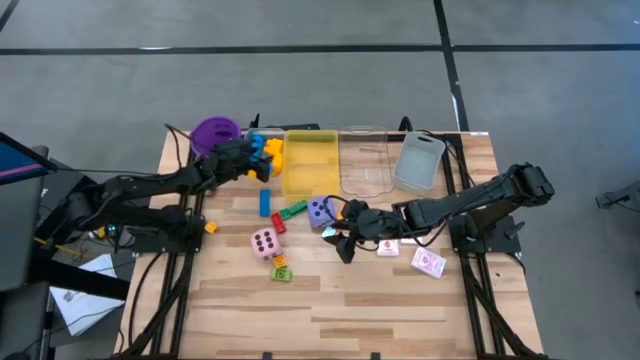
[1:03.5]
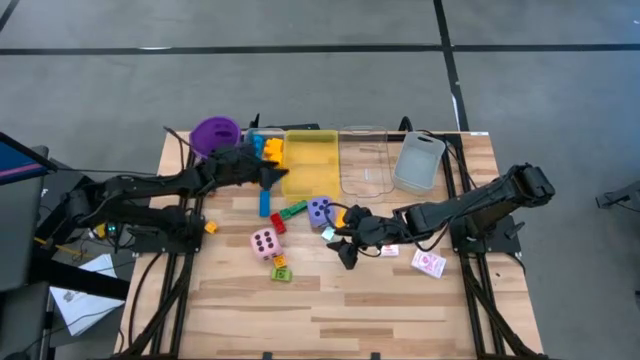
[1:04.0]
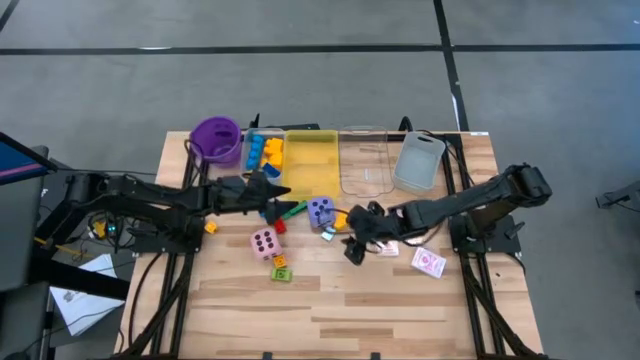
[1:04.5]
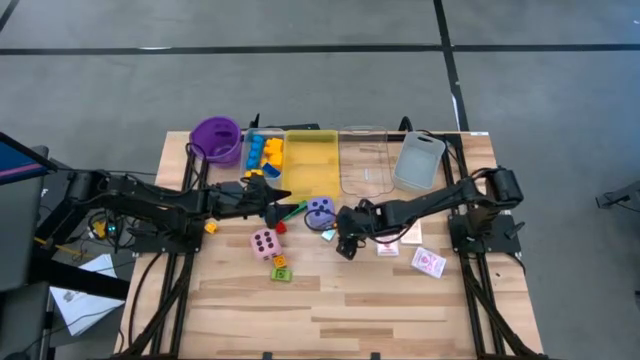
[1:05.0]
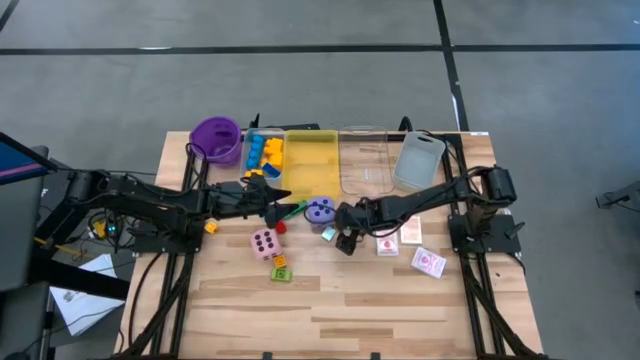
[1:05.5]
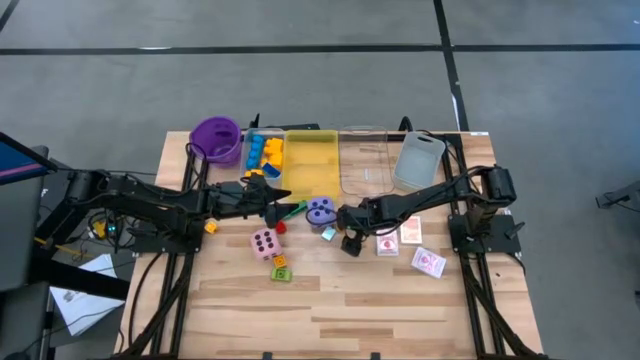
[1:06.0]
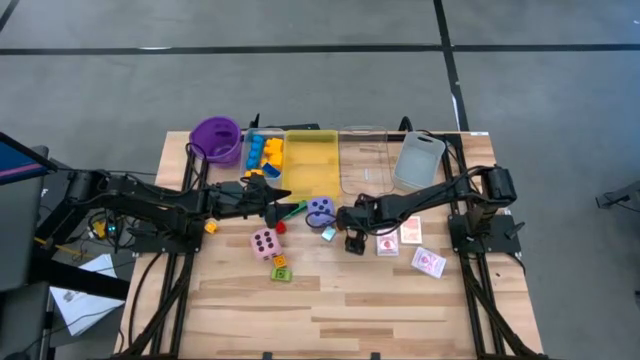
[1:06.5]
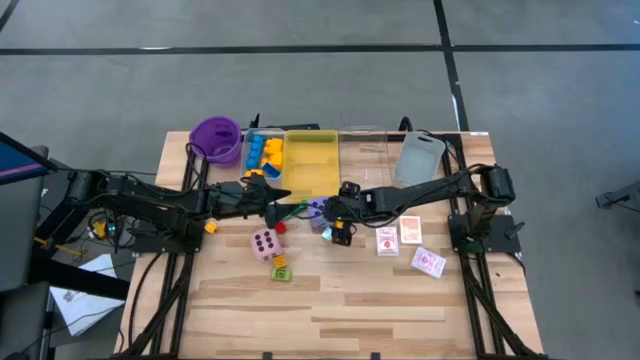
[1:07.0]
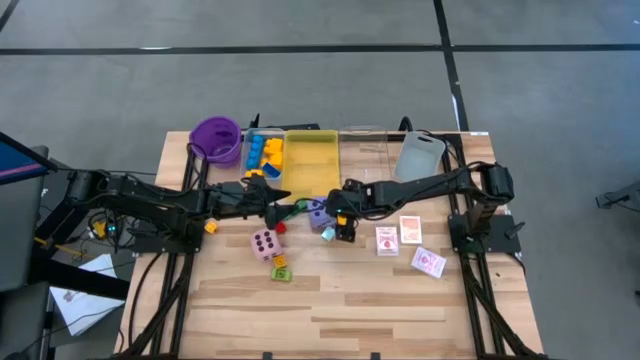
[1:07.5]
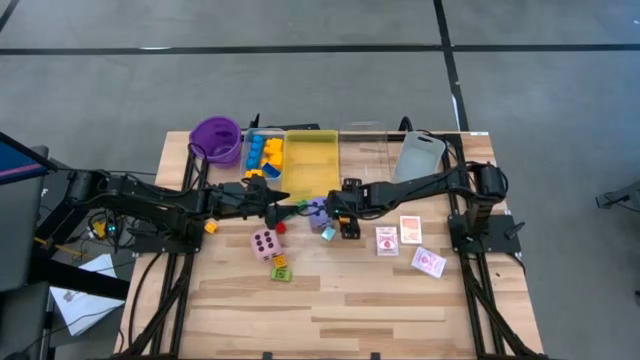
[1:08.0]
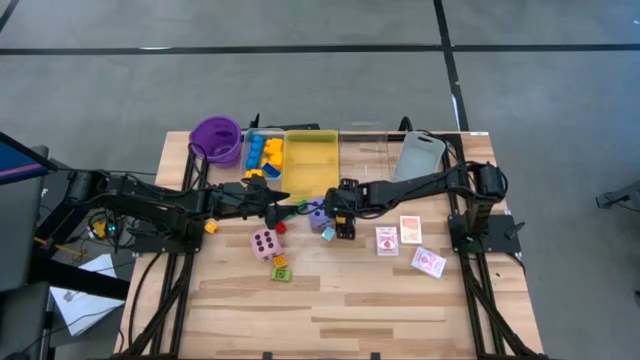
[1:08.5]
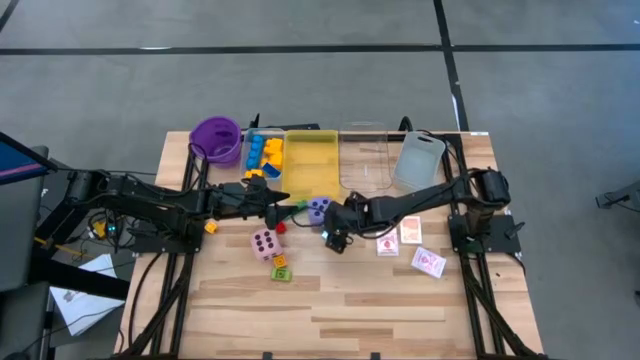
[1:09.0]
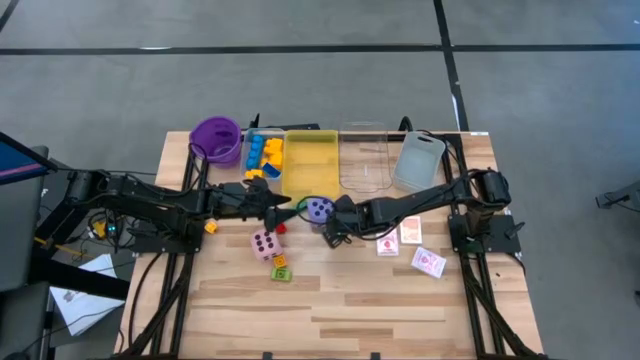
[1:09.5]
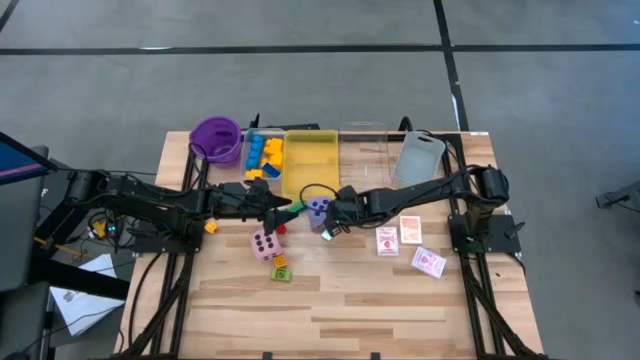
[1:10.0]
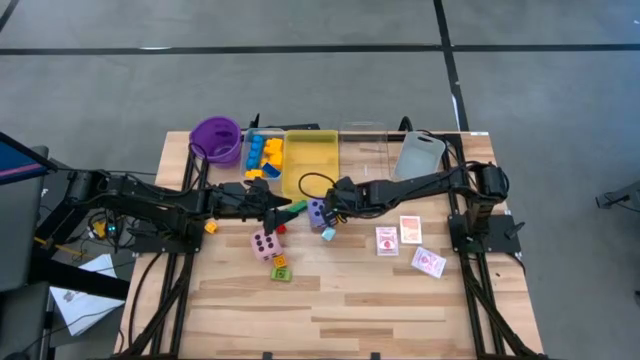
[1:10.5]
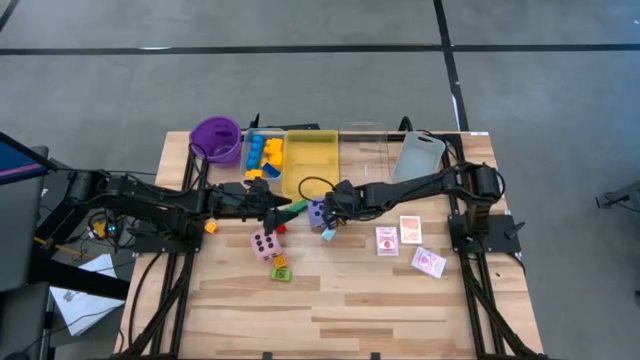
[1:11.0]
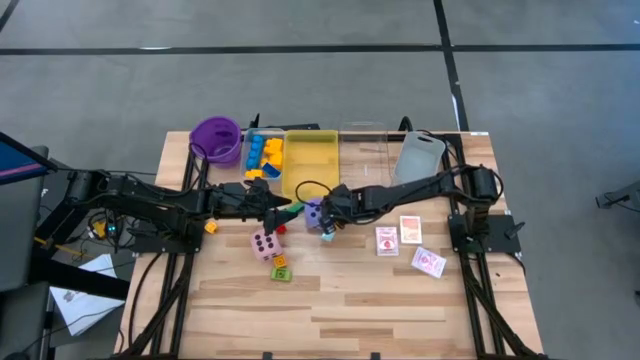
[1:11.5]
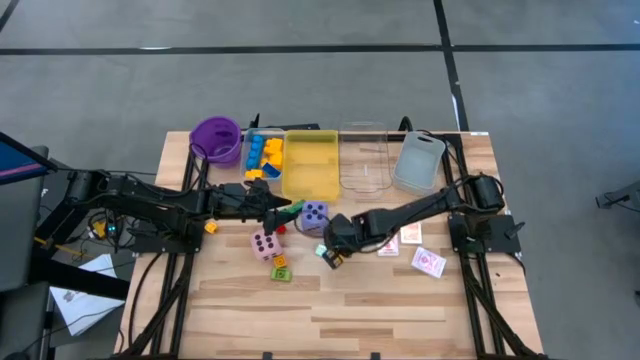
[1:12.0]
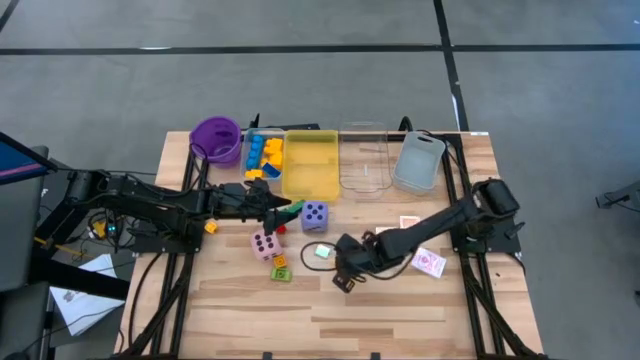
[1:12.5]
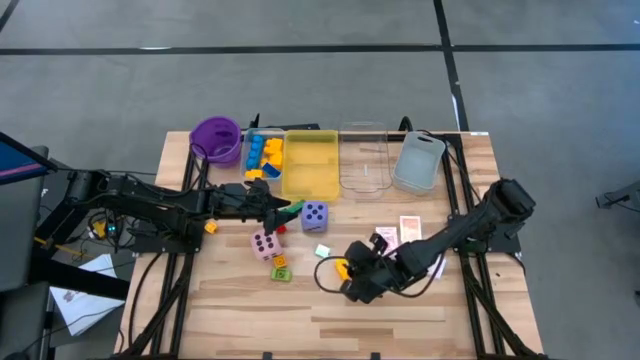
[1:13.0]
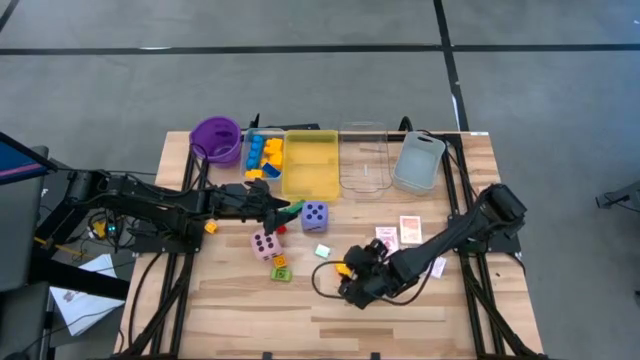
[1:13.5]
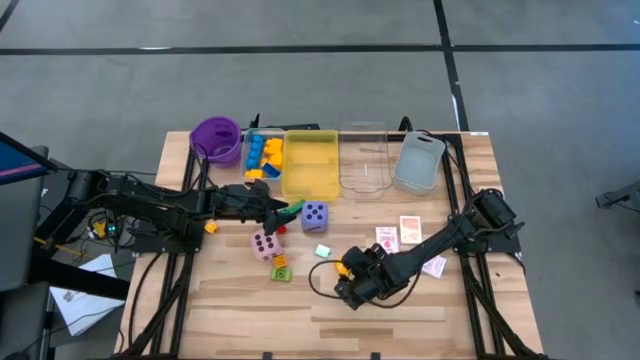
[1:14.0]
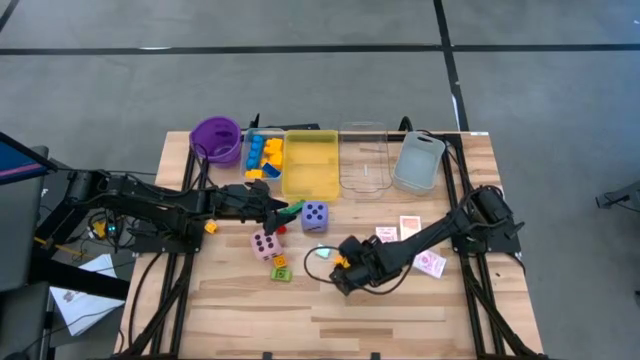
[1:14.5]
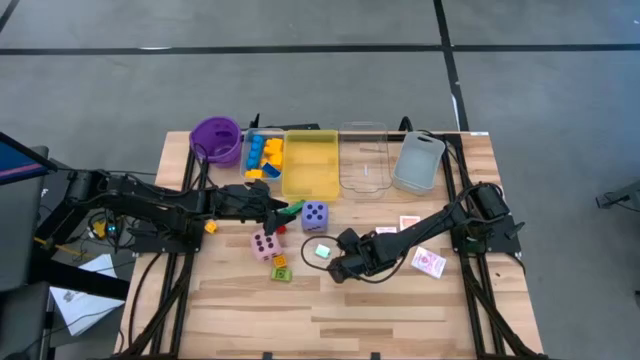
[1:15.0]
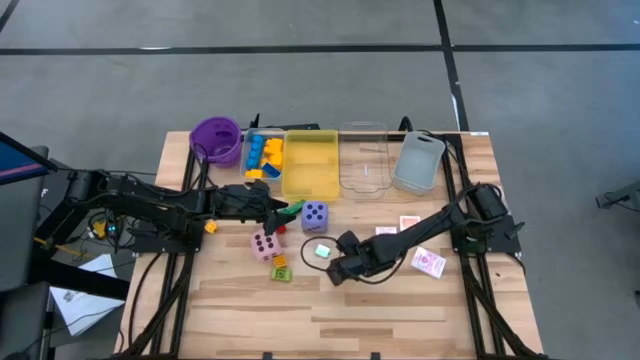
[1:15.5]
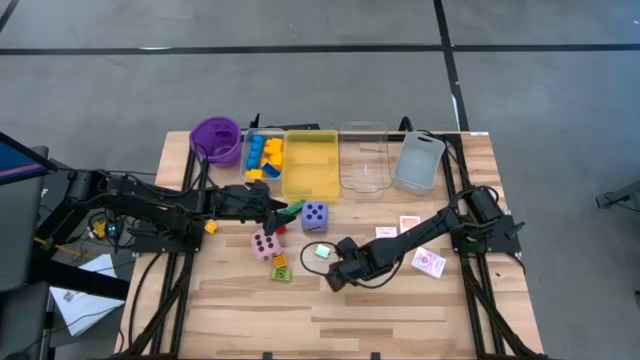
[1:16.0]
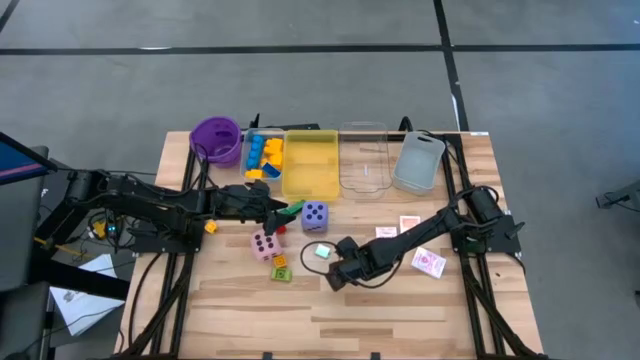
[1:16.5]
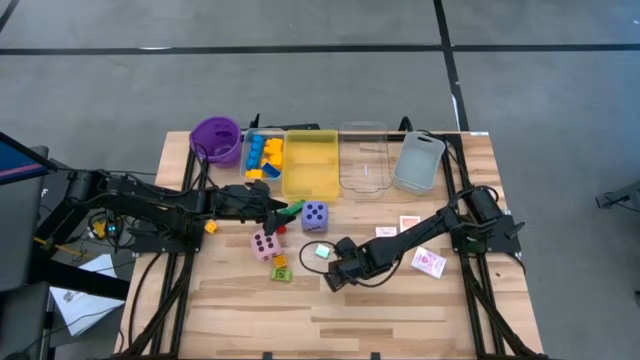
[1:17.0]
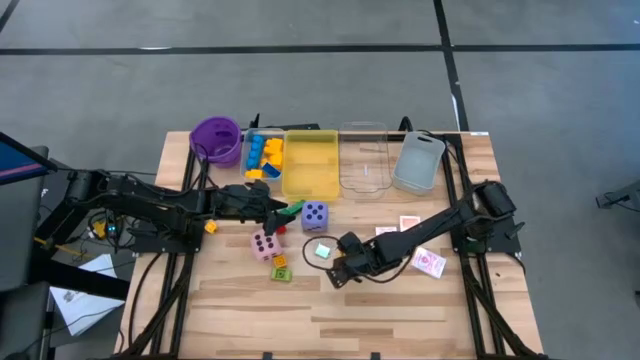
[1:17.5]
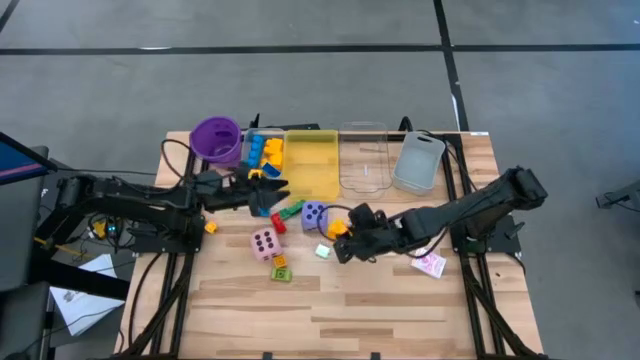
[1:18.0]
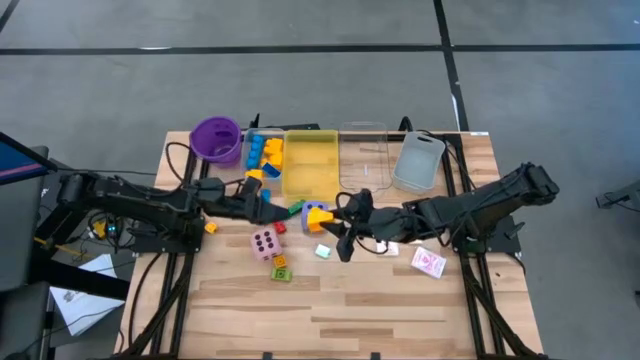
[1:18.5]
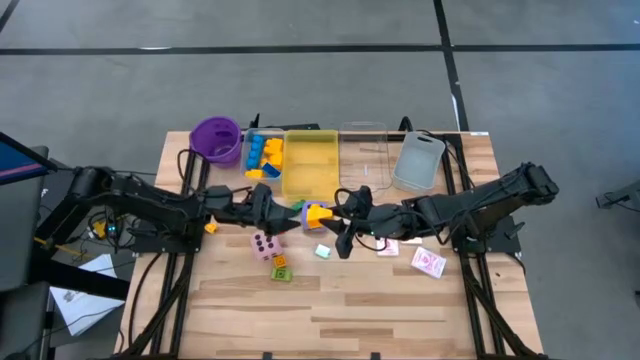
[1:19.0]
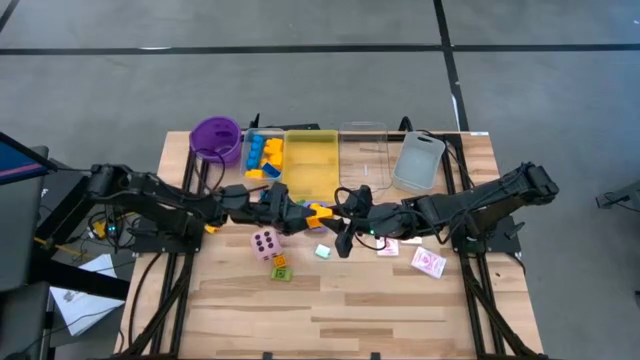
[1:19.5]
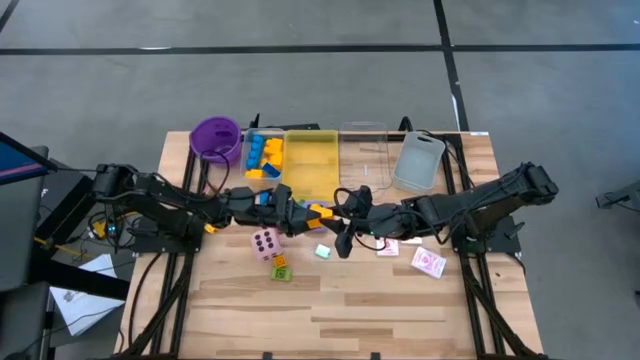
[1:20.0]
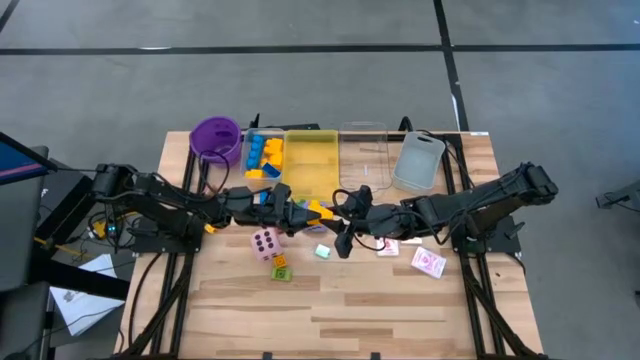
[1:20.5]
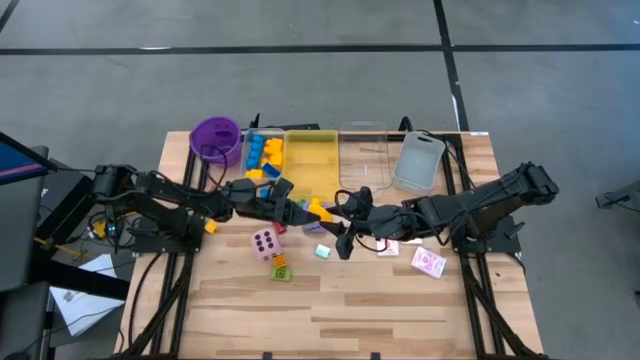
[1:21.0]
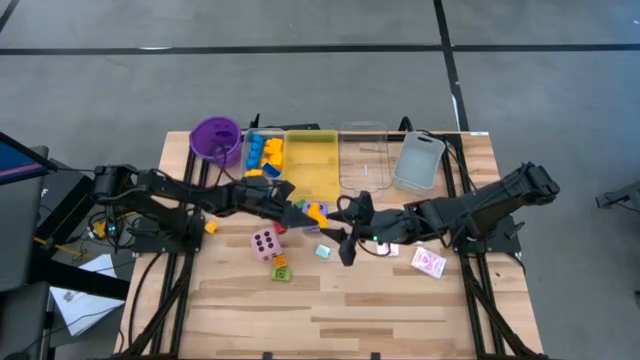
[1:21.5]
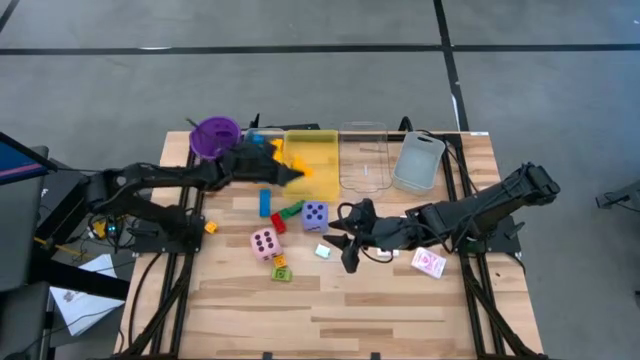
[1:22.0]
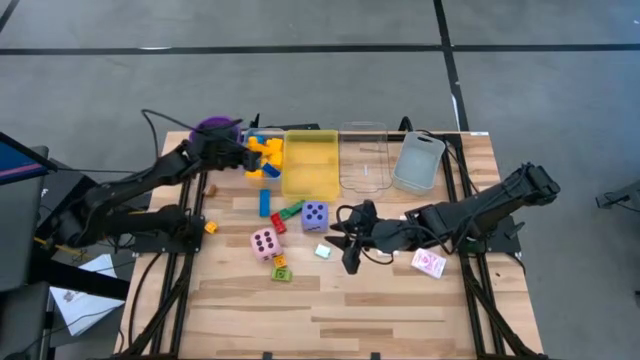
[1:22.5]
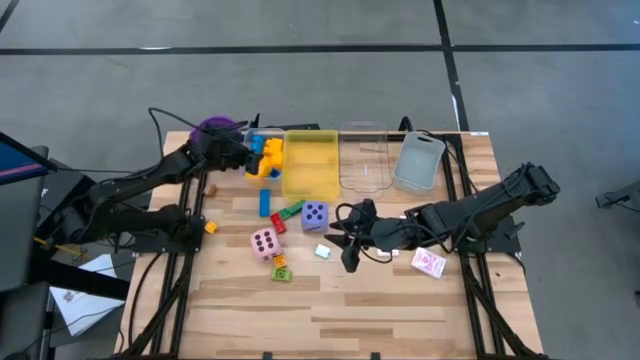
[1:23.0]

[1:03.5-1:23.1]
Task: Pick & Place Toys
Put the right yellow stud game piece into the left transparent bin
